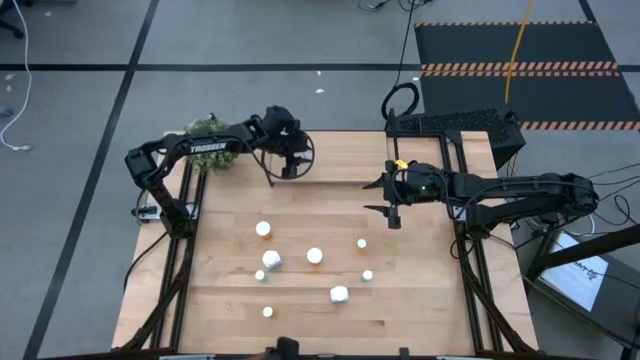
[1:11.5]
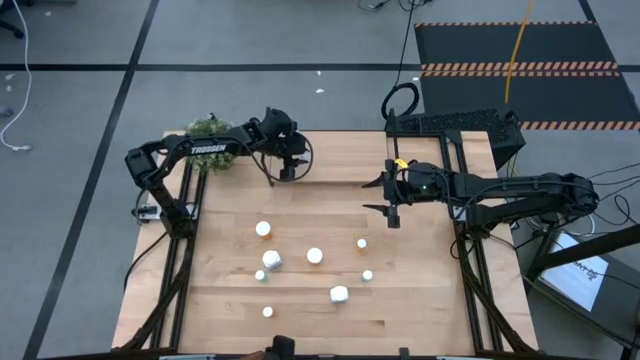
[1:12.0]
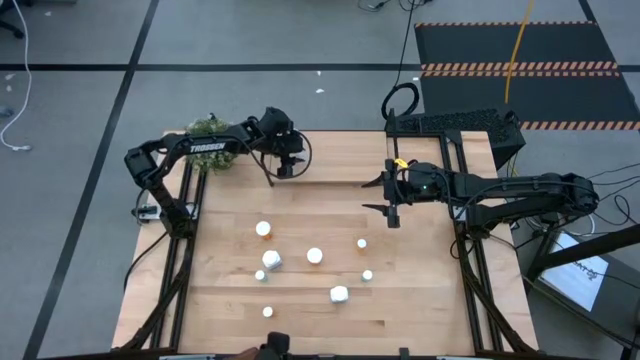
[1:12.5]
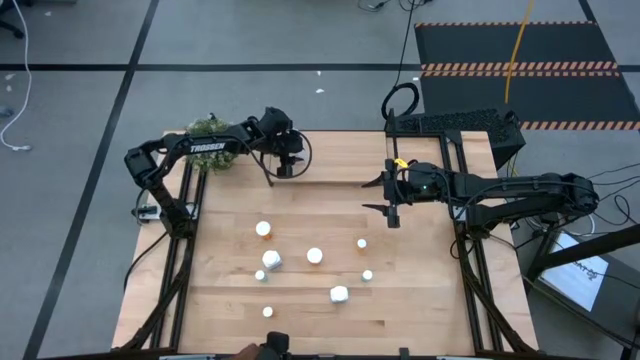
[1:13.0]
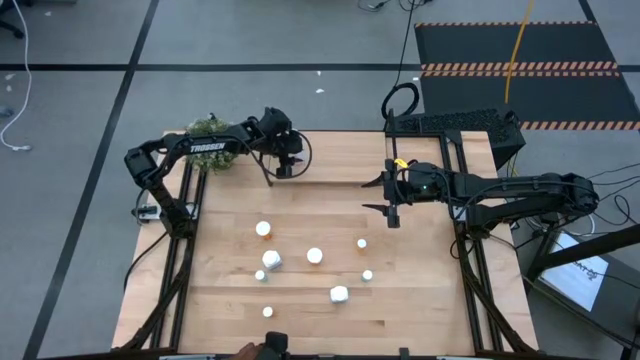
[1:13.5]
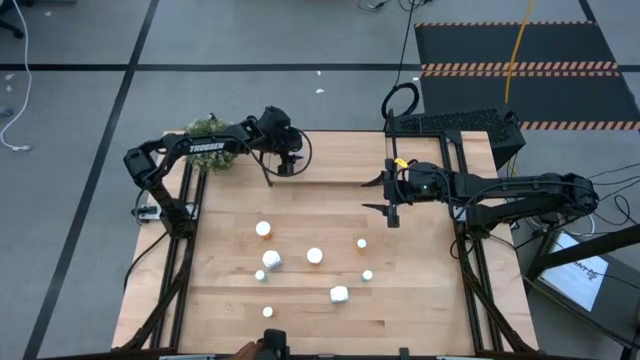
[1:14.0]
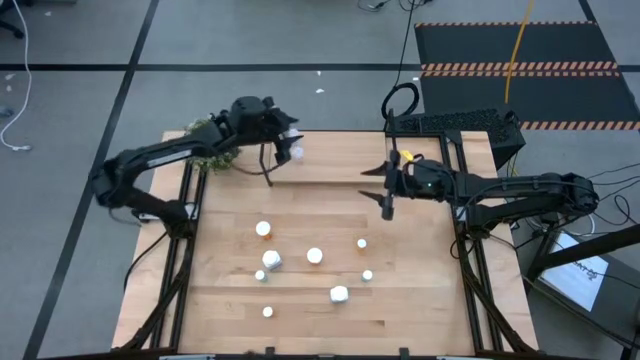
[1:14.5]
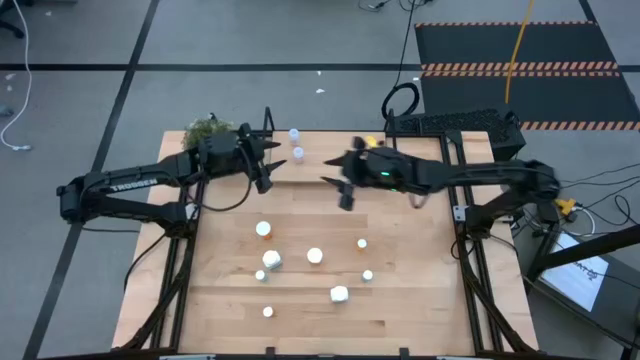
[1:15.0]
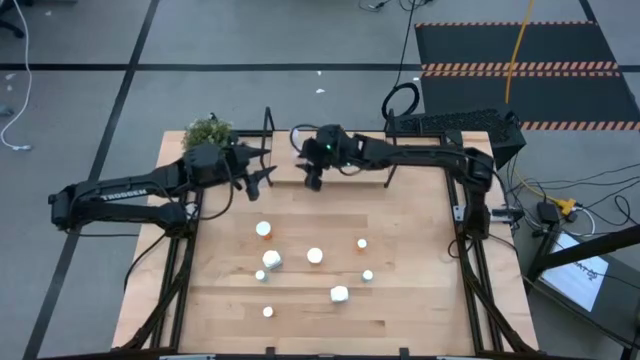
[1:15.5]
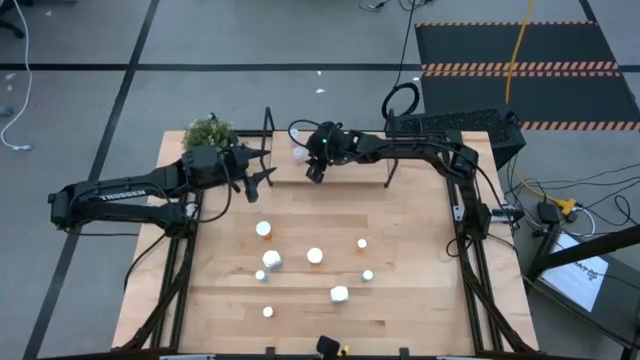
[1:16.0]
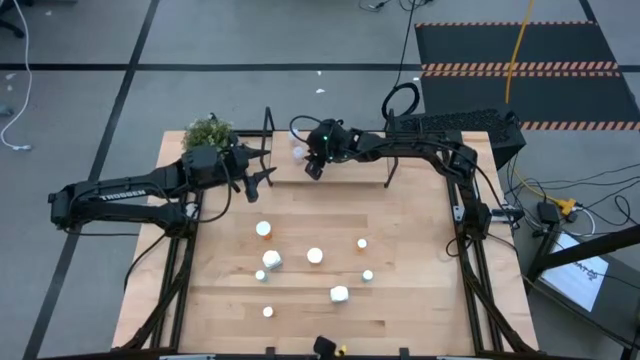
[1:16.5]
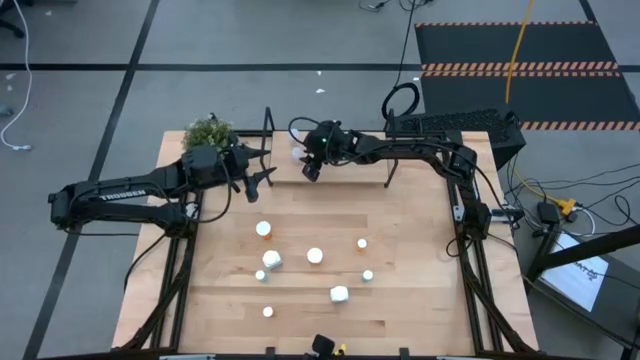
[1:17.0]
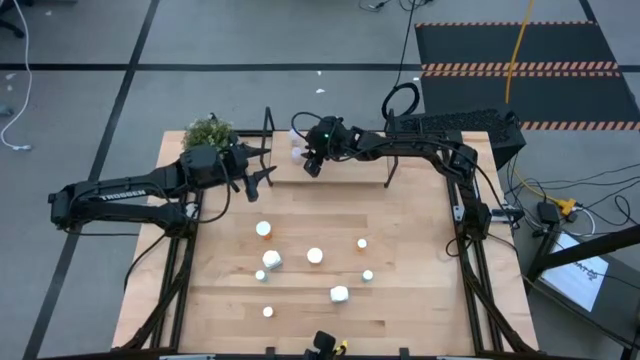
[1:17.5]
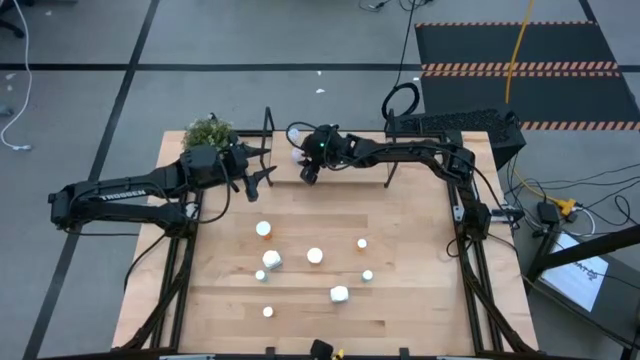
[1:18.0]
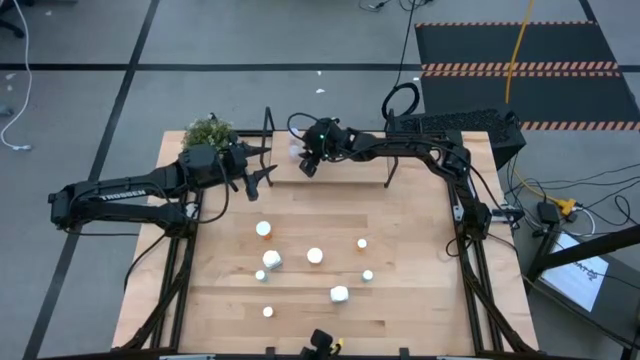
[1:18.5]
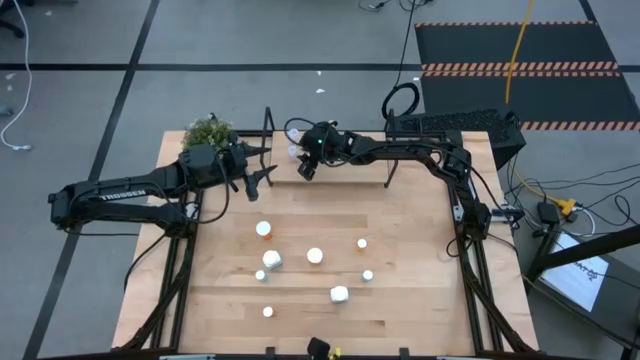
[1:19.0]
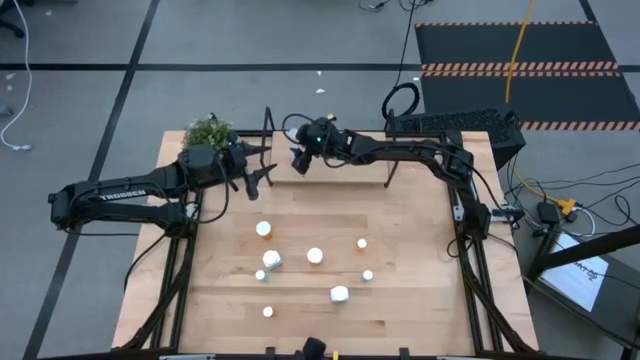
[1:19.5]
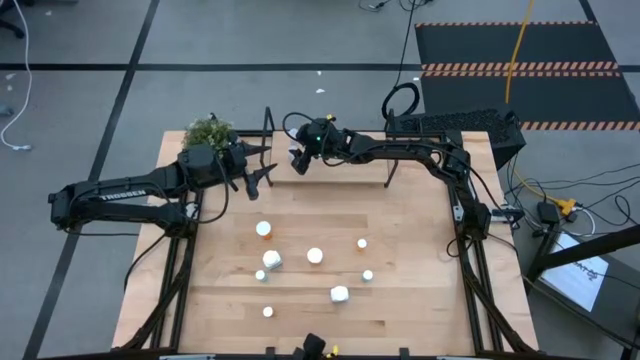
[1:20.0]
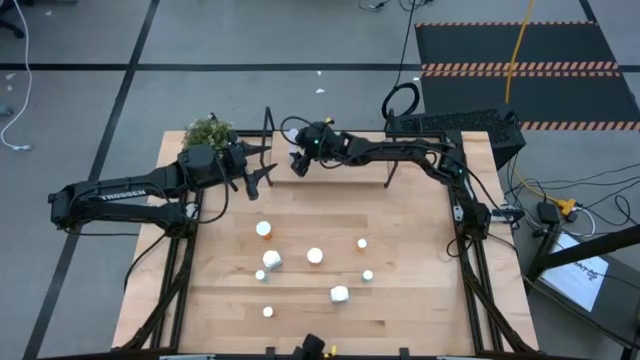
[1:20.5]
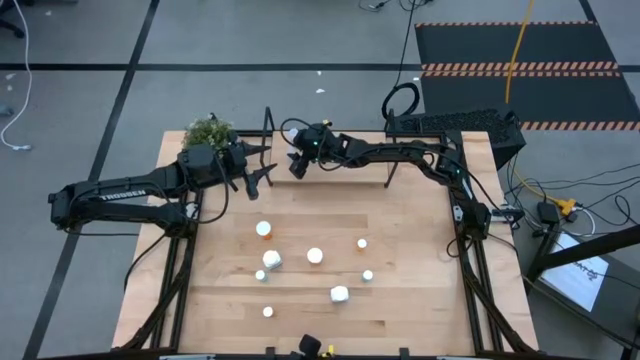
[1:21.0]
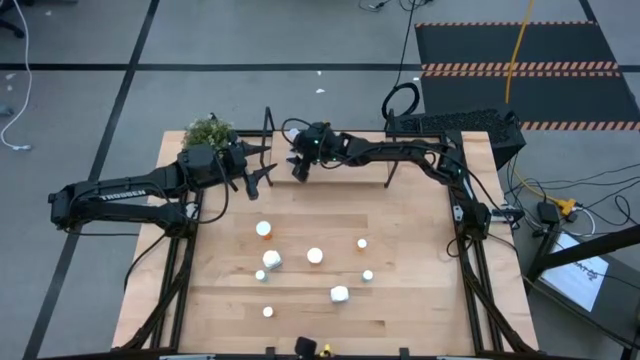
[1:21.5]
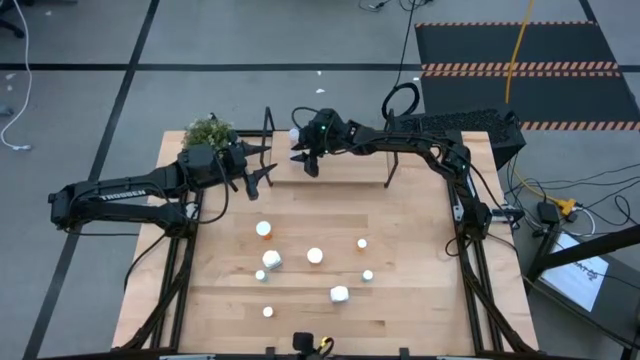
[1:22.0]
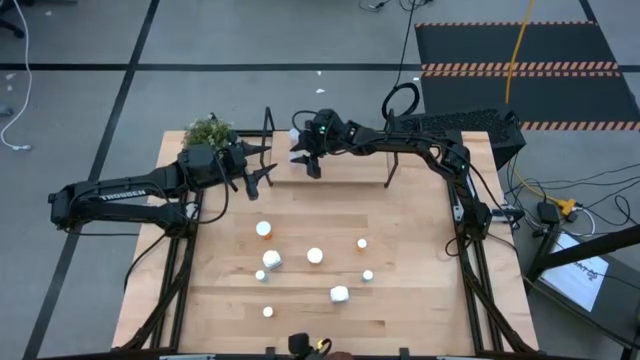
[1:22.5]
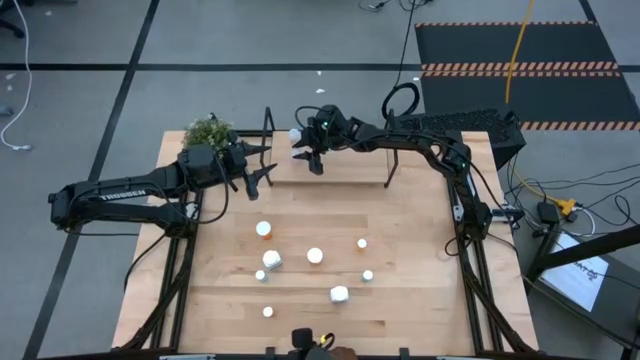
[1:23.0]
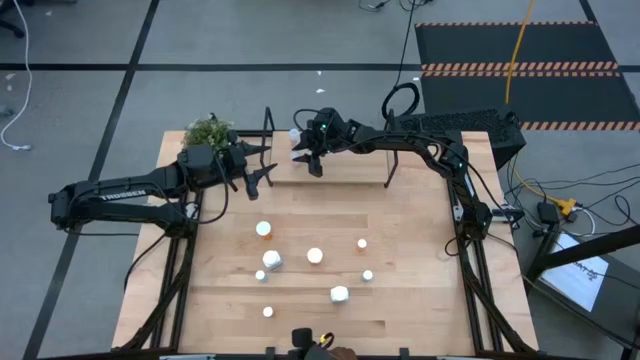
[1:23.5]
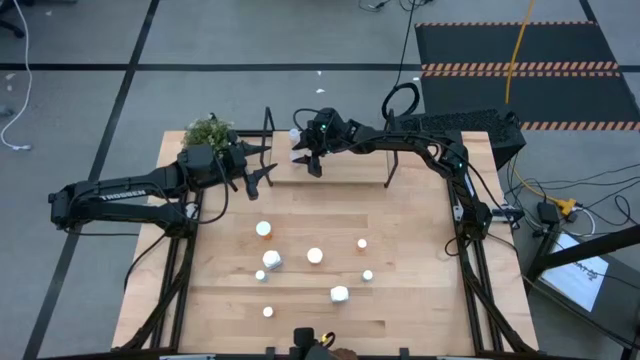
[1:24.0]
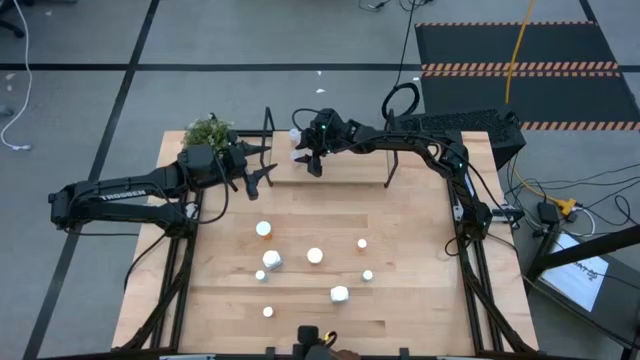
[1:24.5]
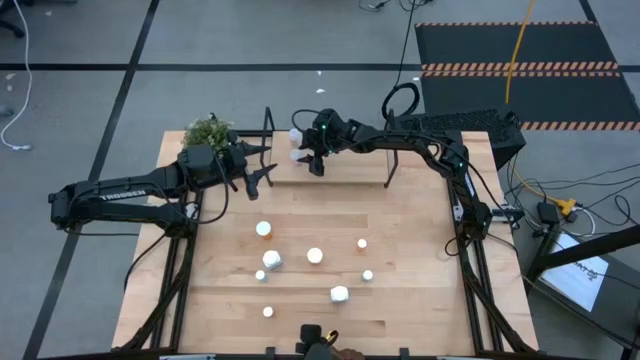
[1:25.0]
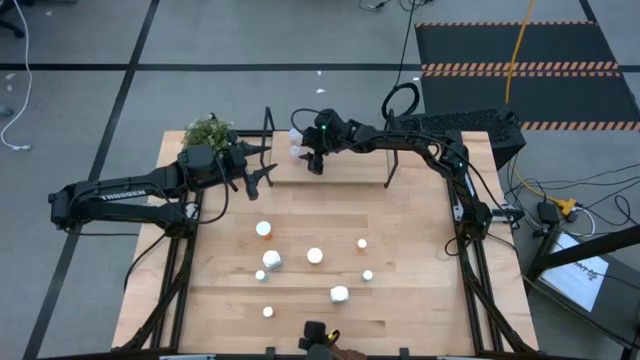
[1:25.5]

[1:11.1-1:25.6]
Task: Pick and place medicine bottles onto shelf by color
Put the transparent pill bottle on the shelf aligned with the other transparent pill bottle

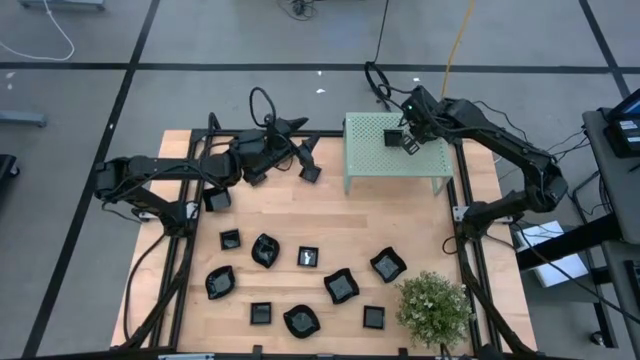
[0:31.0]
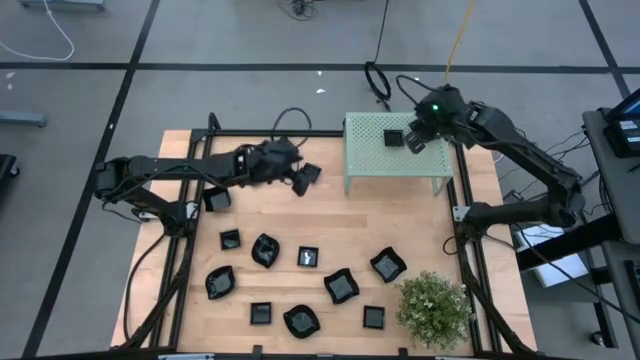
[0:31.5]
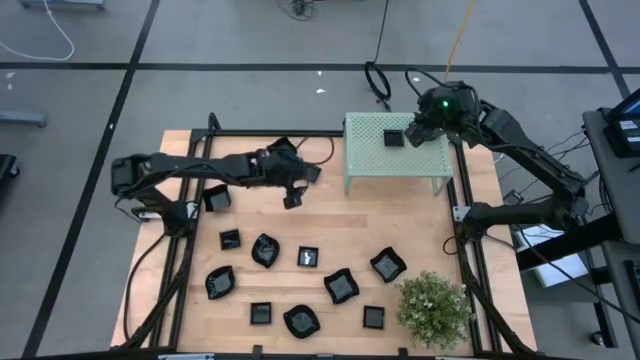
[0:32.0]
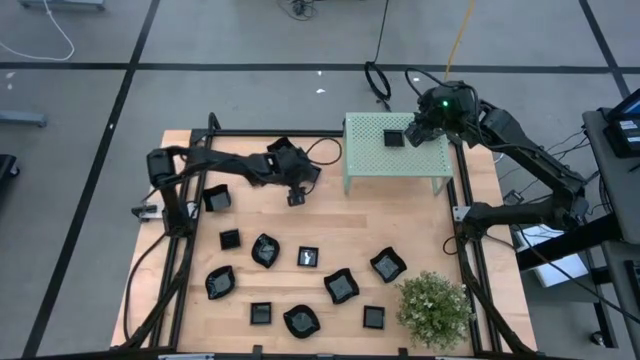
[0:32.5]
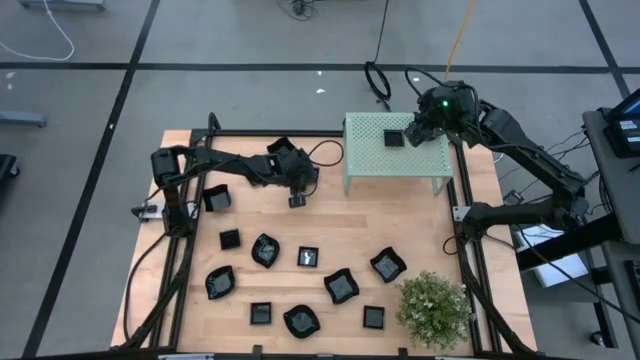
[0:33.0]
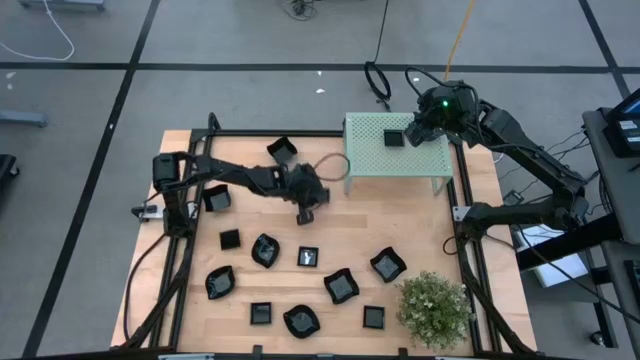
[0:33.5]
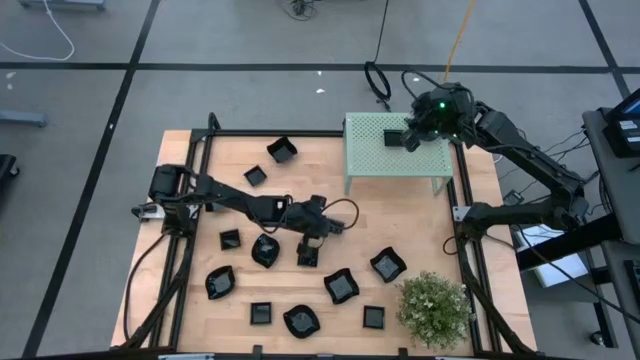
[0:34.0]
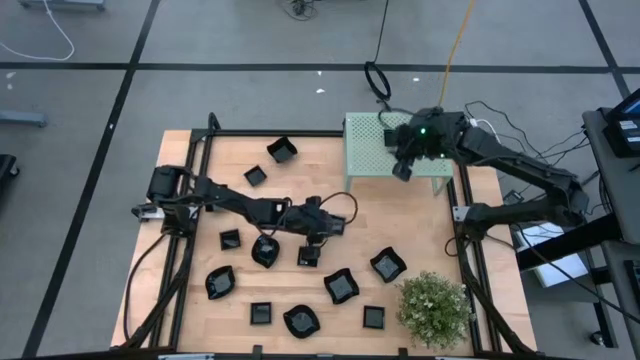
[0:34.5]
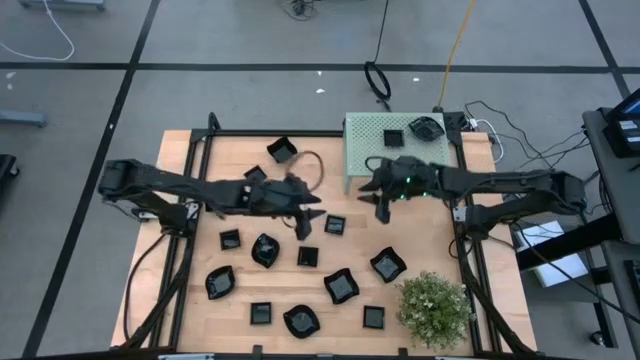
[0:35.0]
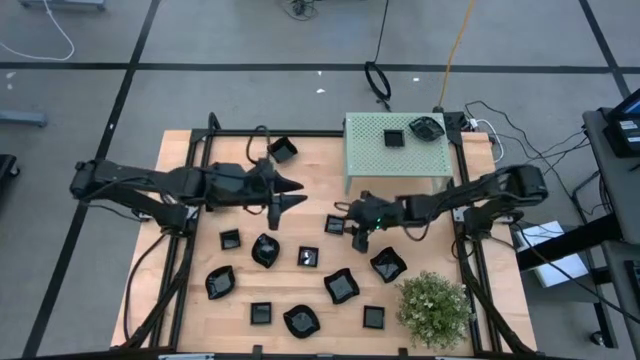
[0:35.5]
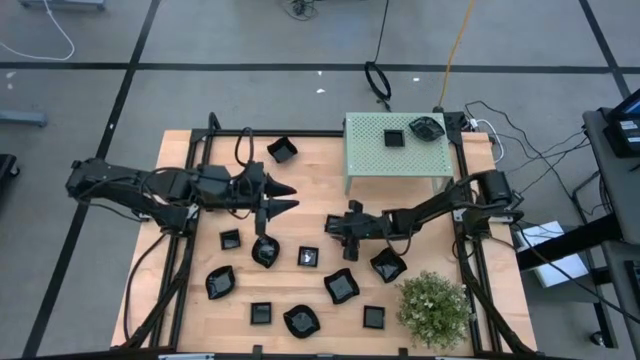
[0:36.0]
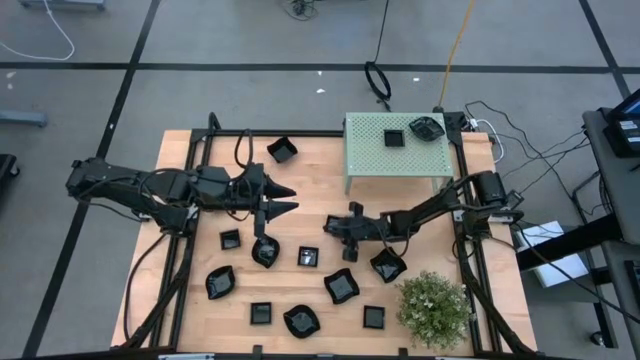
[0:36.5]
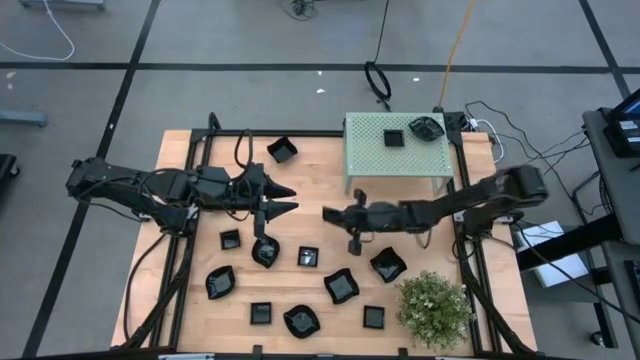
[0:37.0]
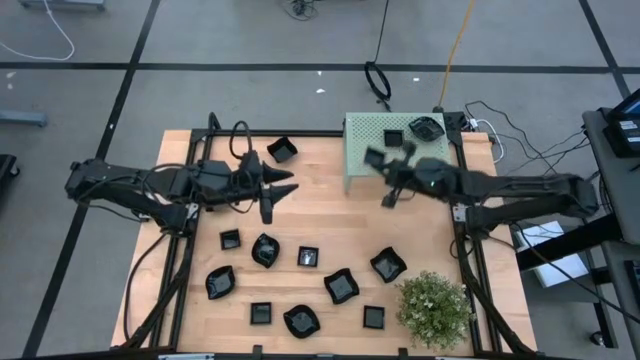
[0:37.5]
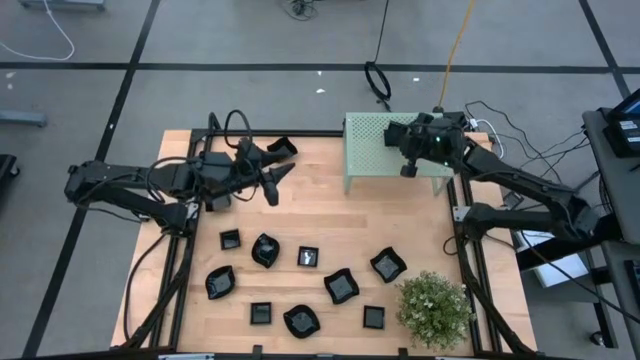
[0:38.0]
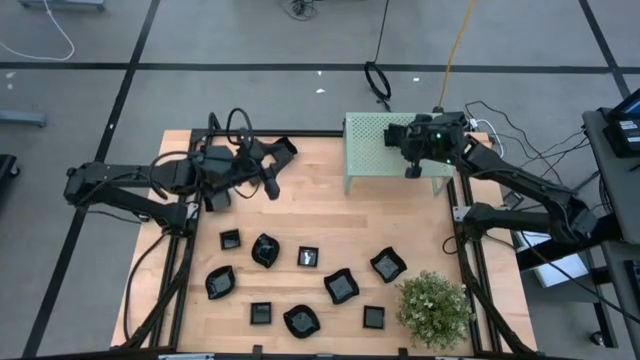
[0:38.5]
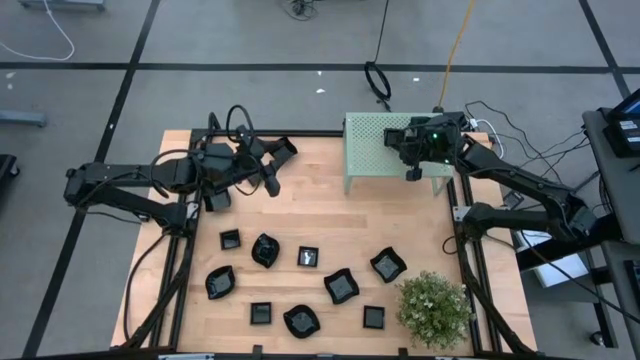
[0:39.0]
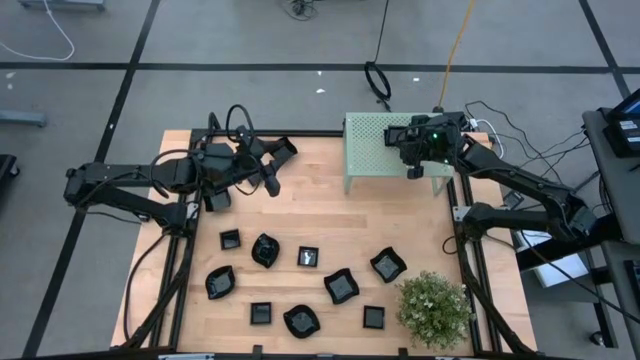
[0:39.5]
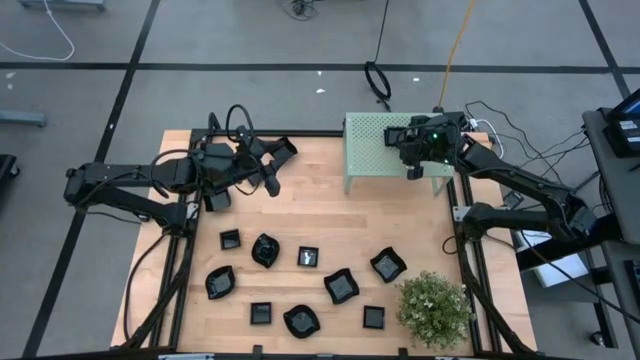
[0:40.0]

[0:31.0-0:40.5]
Task: Pick & Place Mini shaped plates
Stack the black square plate on top of the square plate on the shelf
